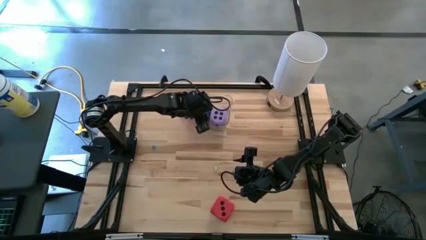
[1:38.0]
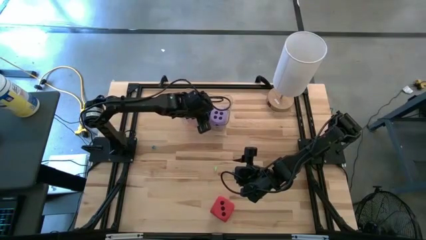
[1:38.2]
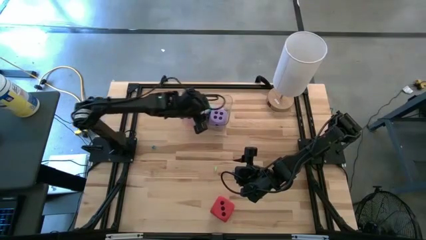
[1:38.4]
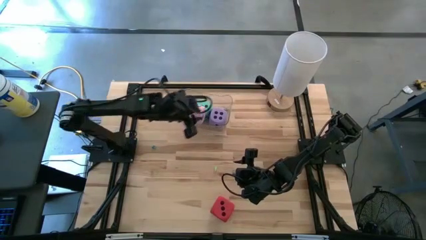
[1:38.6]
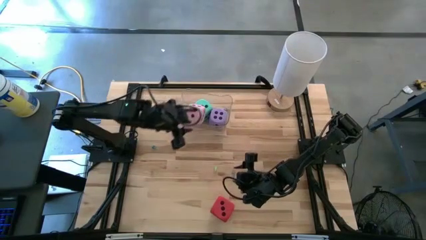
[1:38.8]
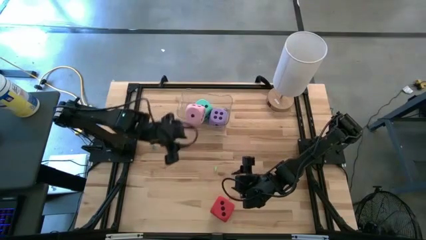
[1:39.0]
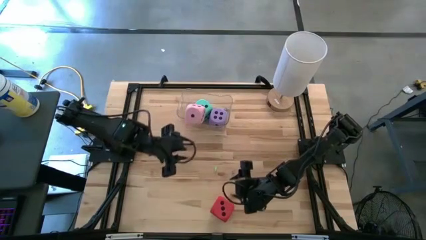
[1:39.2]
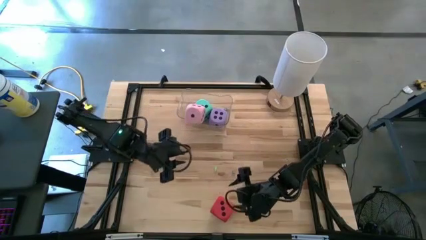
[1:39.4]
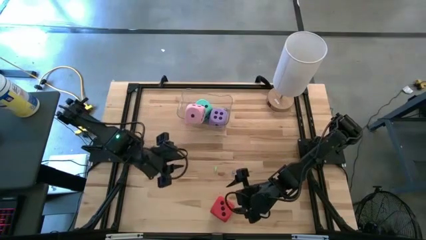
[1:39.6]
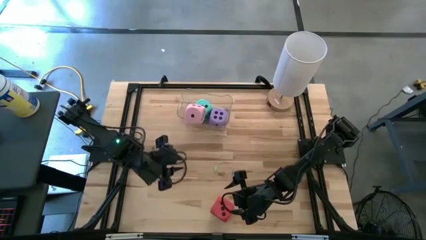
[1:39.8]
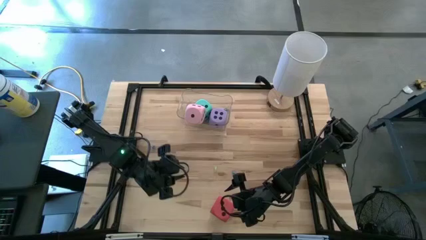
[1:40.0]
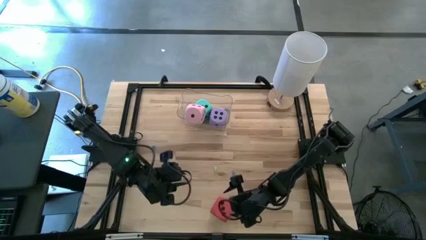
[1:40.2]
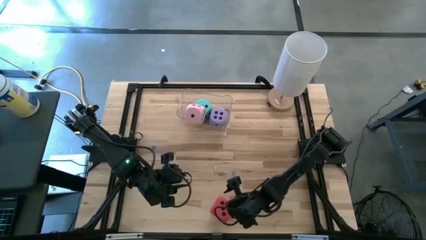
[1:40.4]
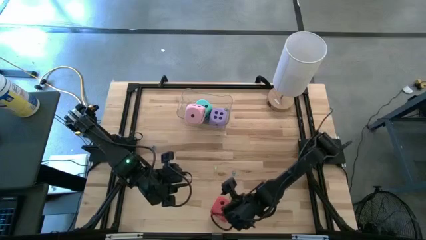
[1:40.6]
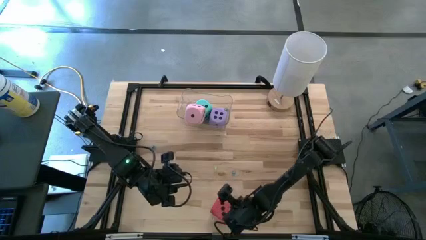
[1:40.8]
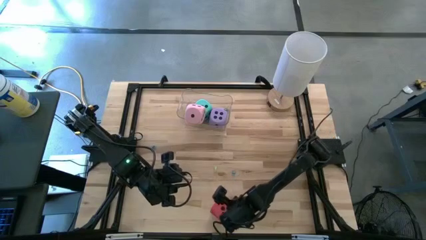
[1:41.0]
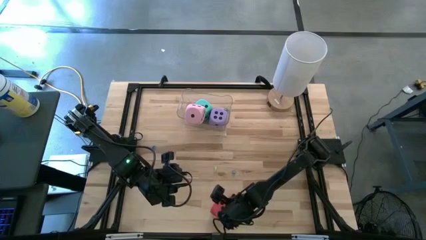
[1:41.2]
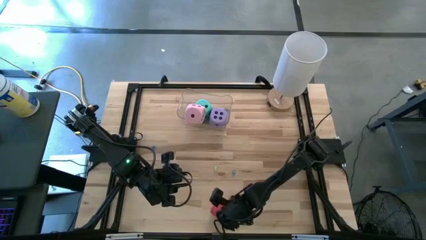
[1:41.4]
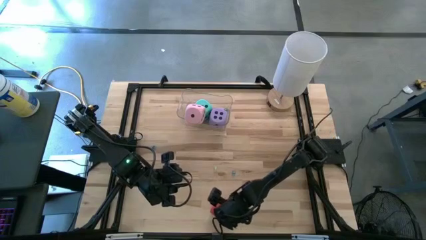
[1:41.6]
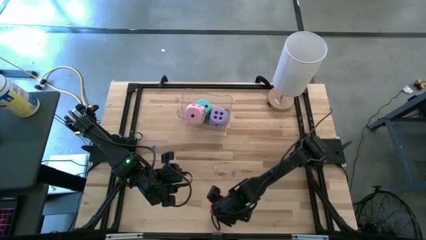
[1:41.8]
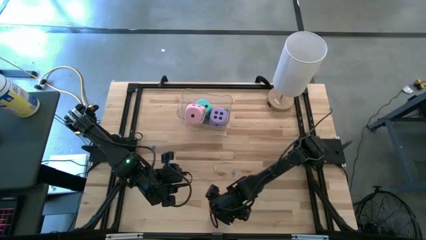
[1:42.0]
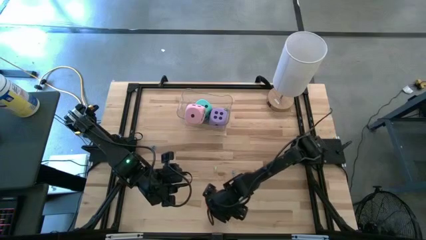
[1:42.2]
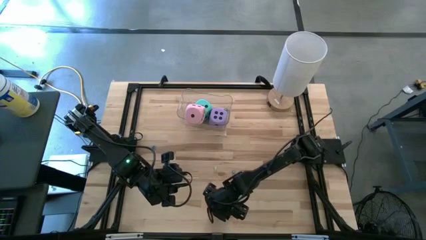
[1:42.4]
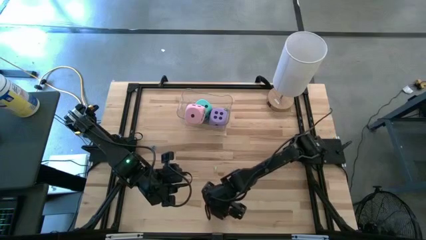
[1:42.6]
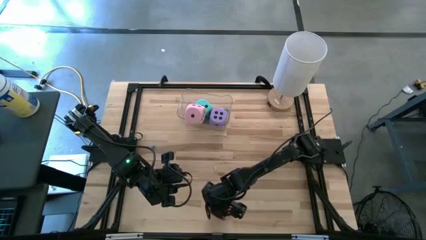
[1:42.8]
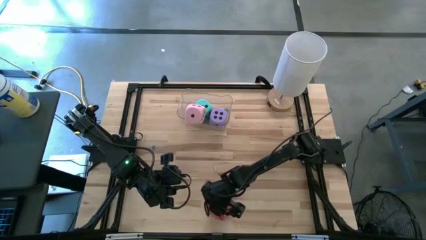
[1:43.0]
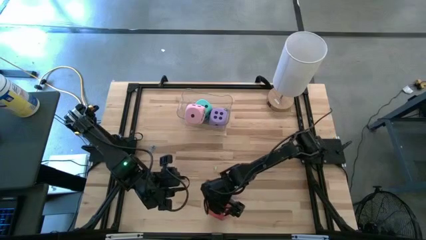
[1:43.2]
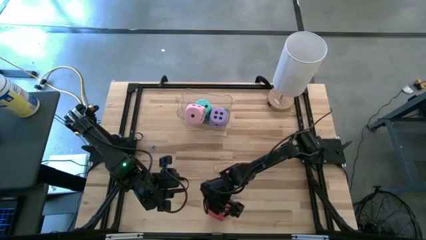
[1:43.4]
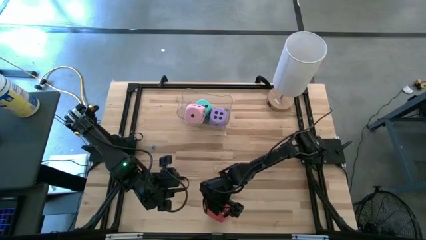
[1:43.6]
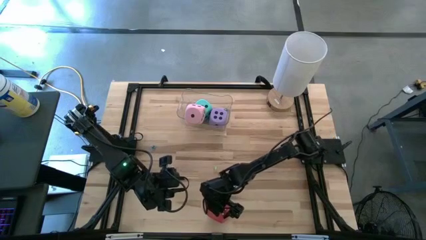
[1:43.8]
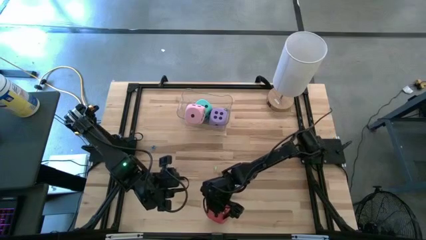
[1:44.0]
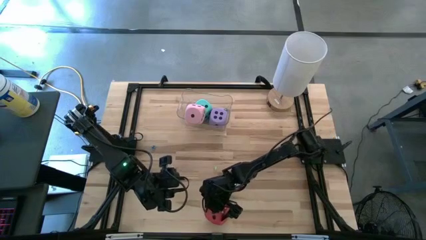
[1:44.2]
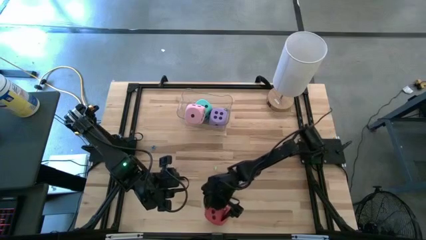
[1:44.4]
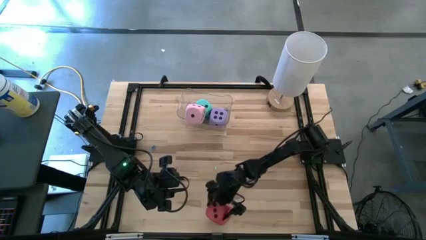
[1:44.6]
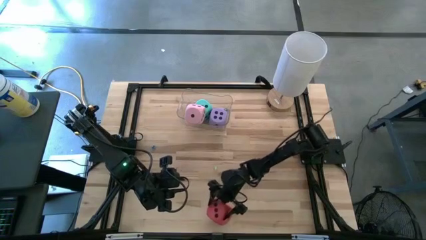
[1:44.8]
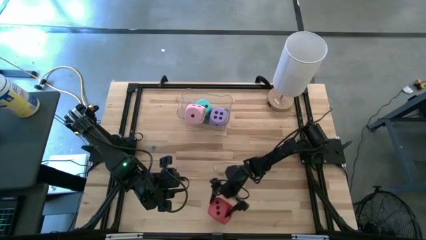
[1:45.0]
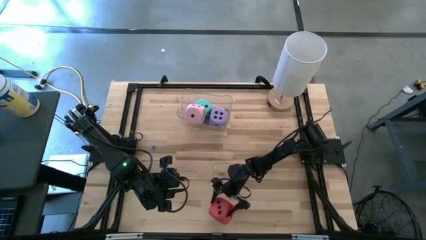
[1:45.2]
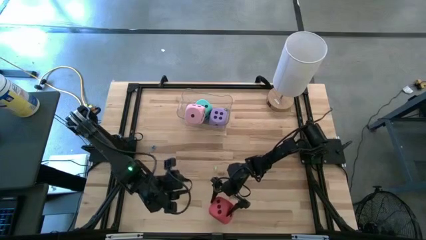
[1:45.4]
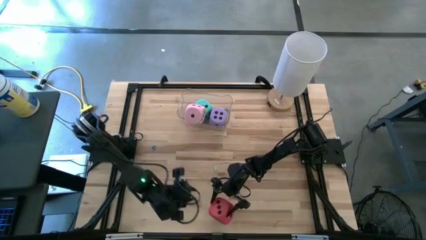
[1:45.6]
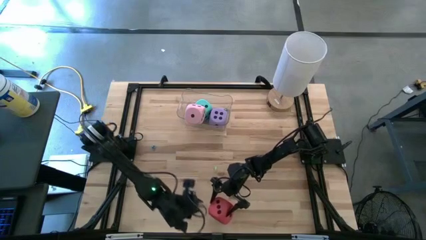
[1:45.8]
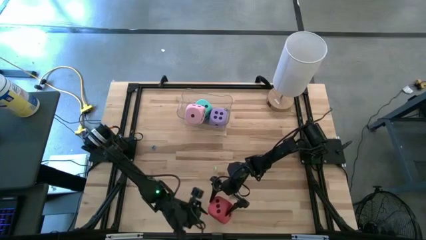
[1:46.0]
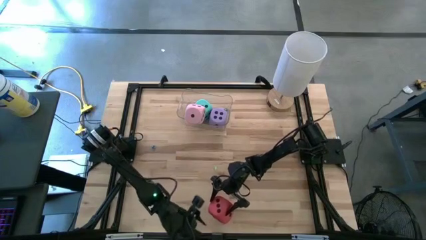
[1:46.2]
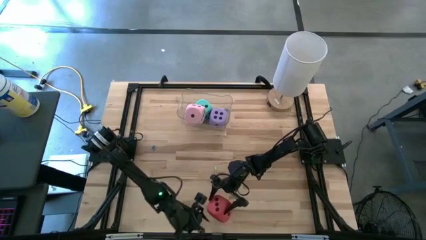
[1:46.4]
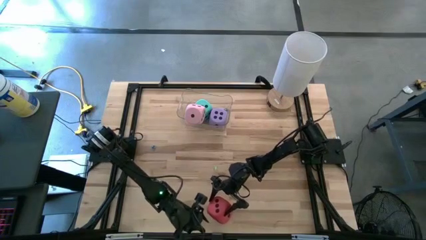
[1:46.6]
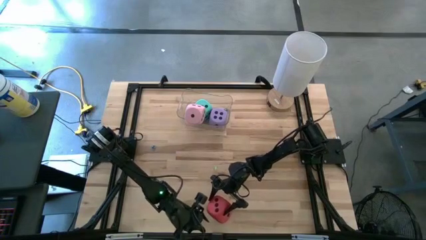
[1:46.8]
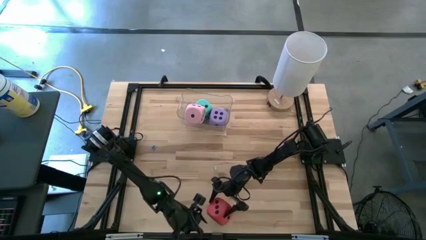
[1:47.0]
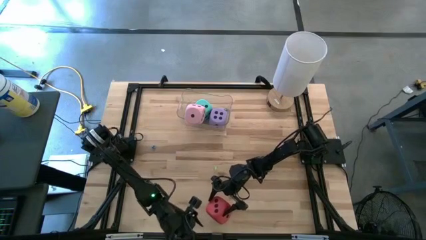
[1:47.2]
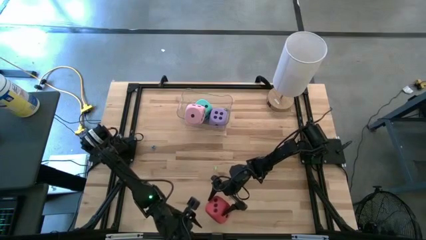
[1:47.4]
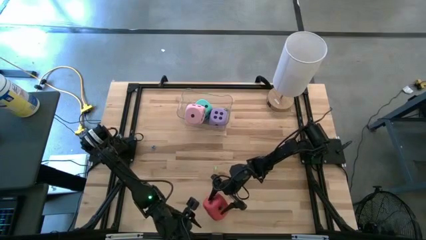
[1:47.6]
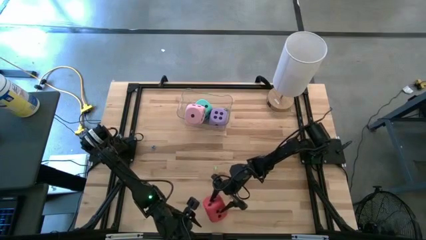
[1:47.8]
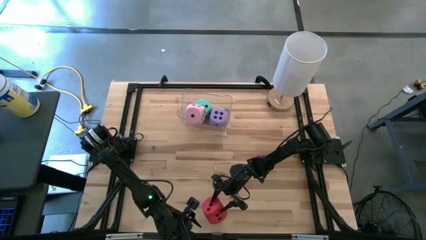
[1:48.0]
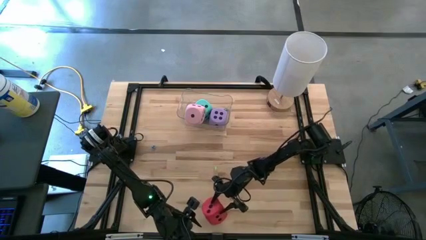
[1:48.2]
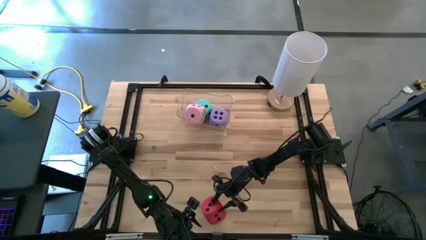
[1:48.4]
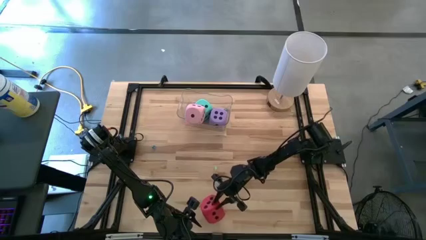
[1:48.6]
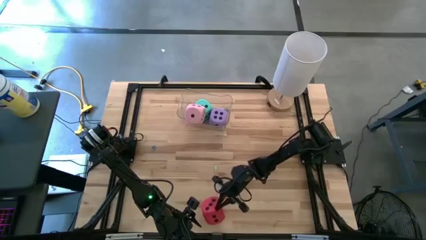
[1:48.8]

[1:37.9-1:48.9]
Task: Pick & Place Dice
Put the large red dice into the transparent bin
